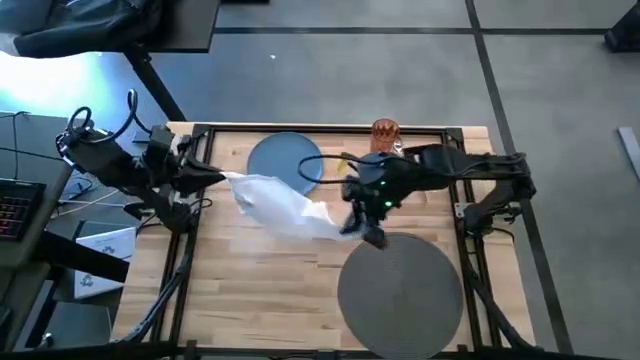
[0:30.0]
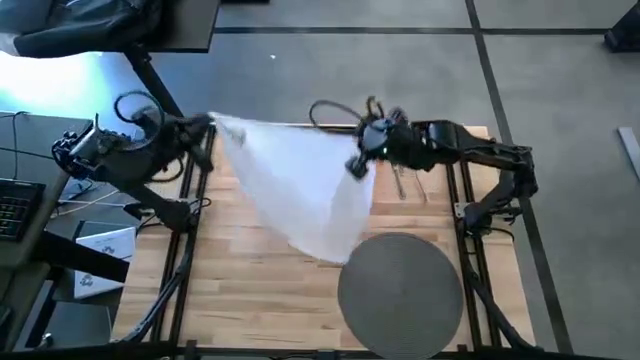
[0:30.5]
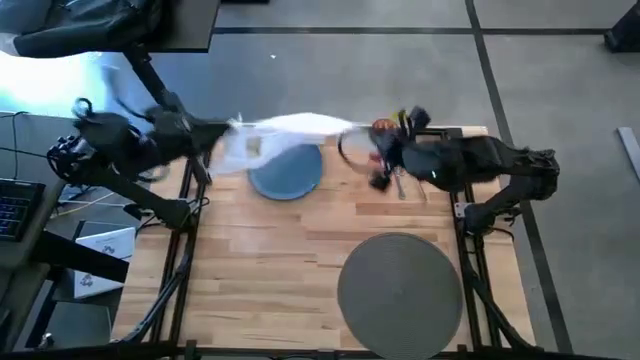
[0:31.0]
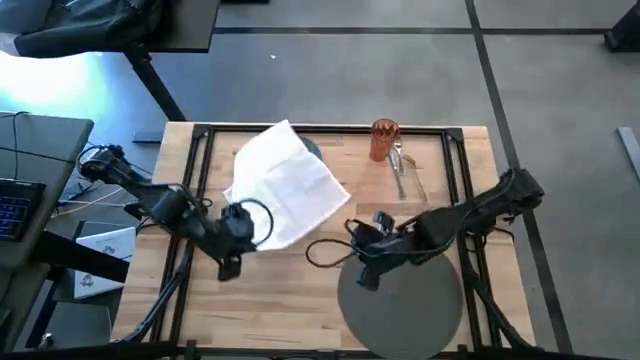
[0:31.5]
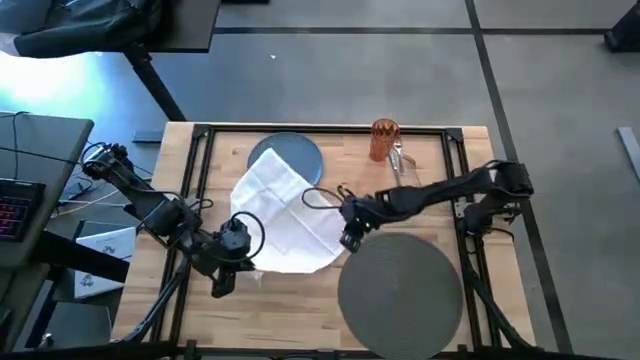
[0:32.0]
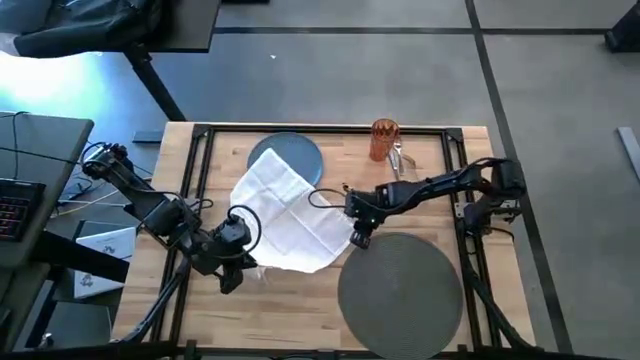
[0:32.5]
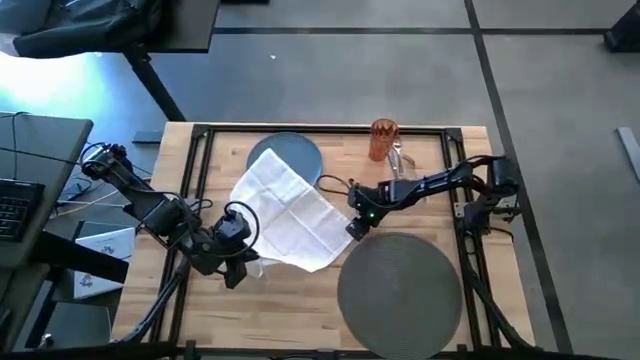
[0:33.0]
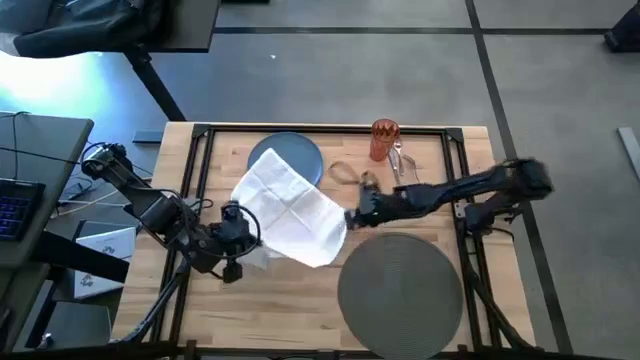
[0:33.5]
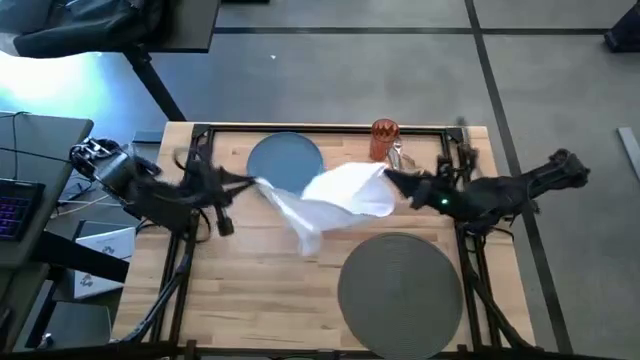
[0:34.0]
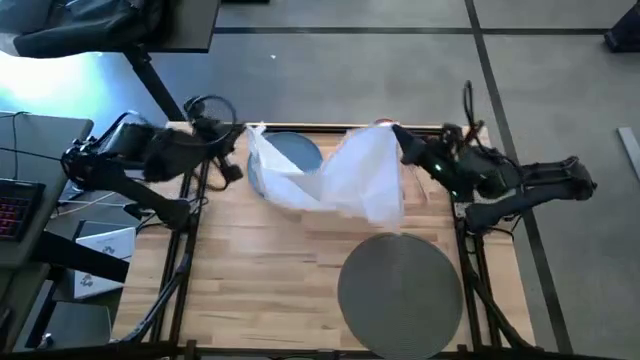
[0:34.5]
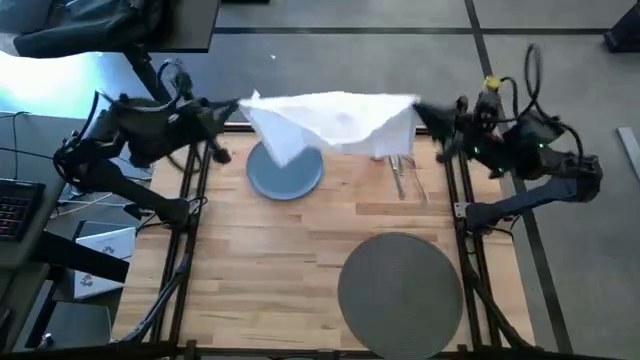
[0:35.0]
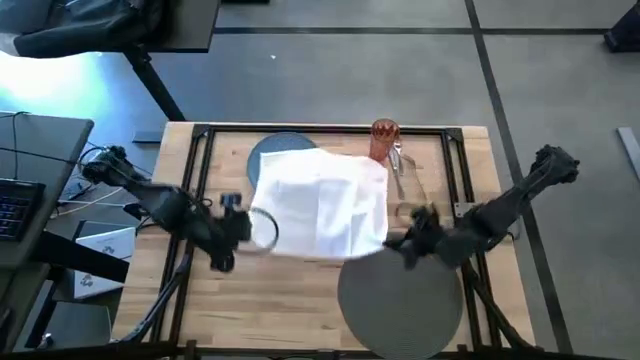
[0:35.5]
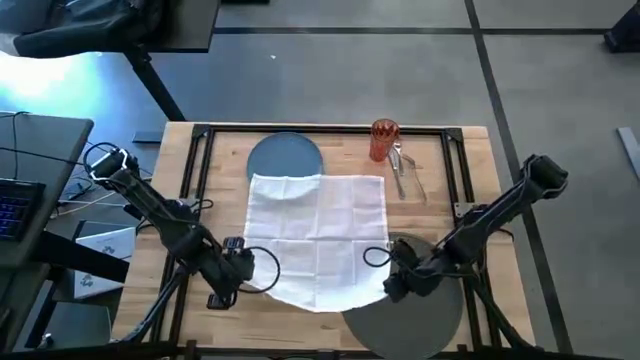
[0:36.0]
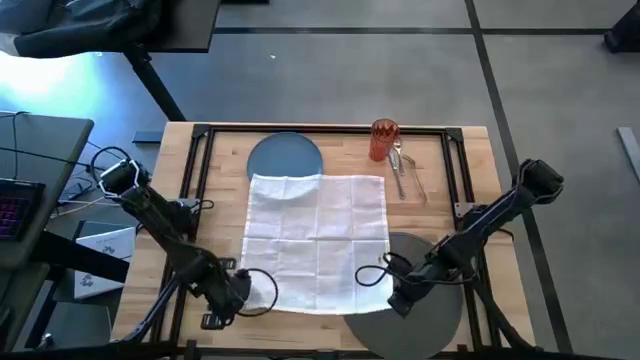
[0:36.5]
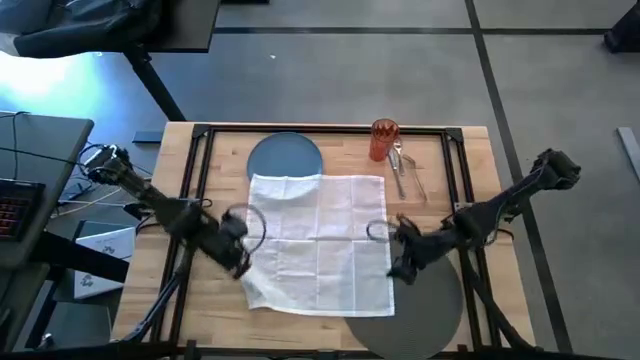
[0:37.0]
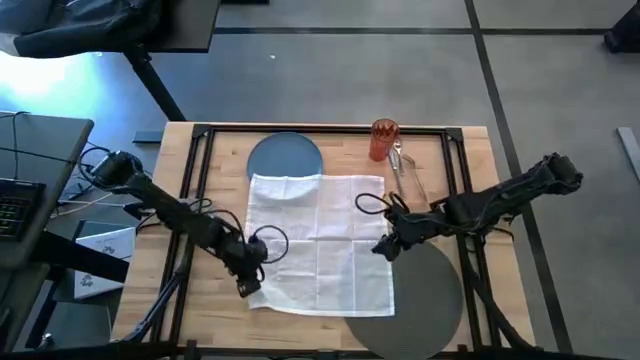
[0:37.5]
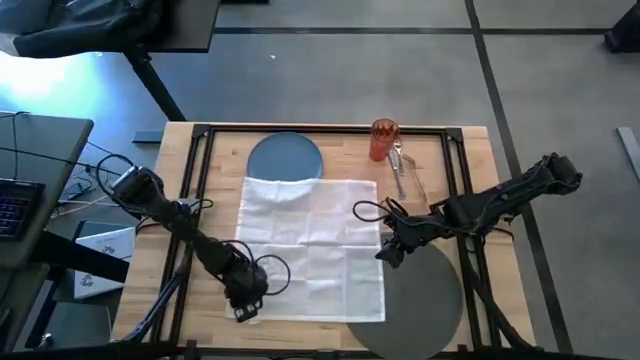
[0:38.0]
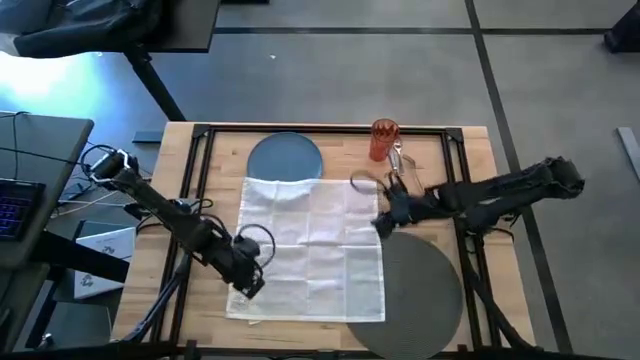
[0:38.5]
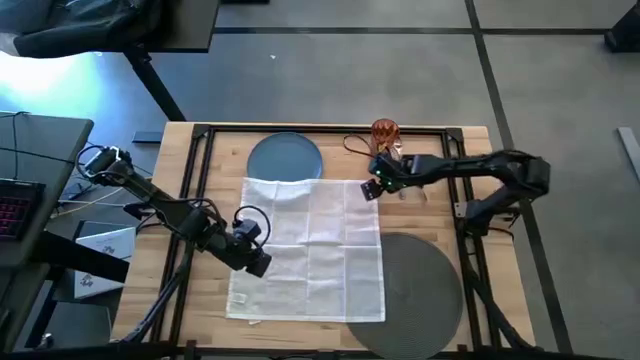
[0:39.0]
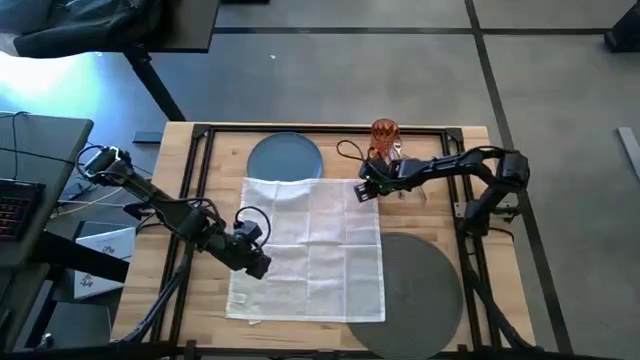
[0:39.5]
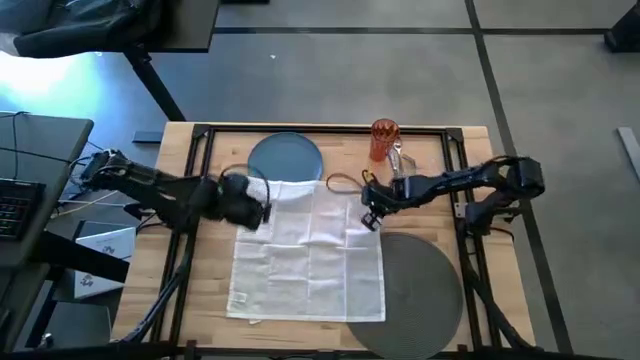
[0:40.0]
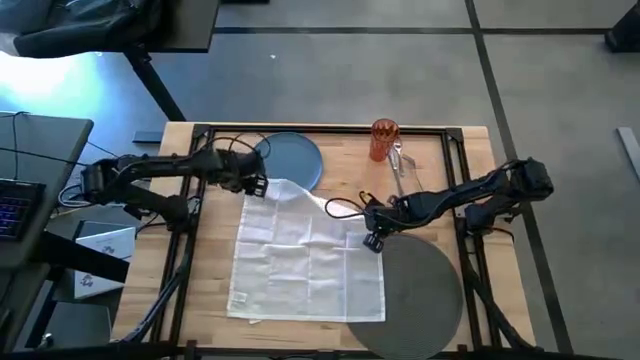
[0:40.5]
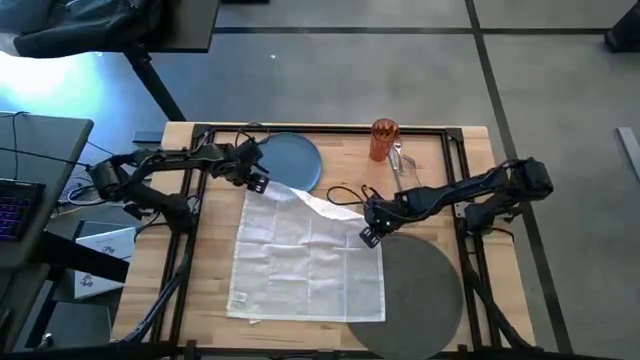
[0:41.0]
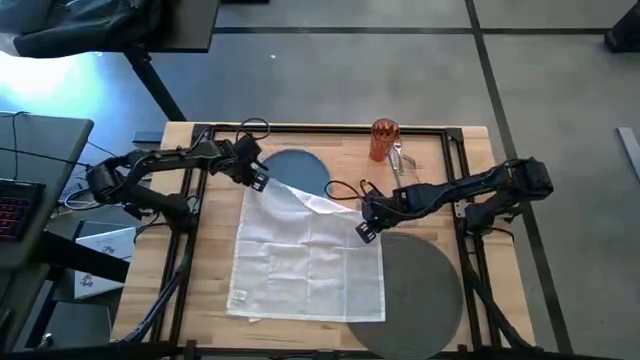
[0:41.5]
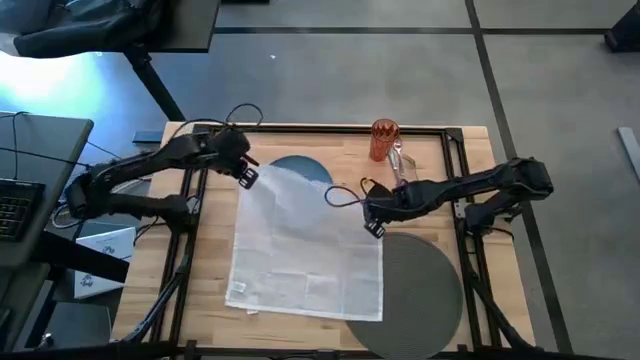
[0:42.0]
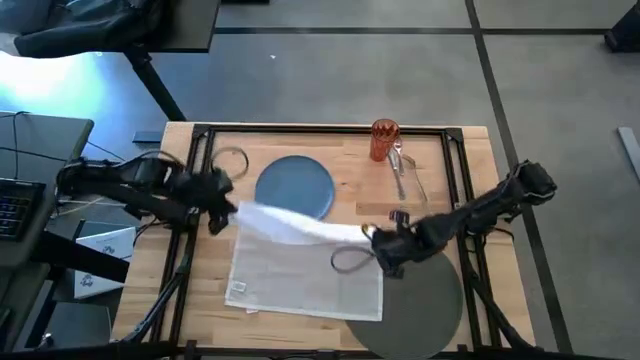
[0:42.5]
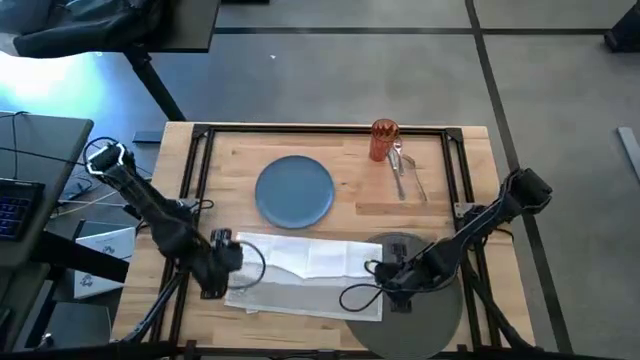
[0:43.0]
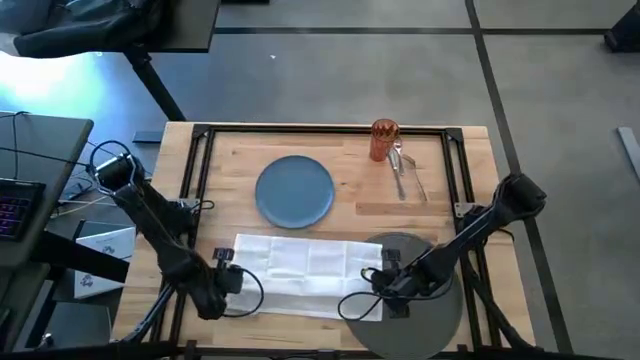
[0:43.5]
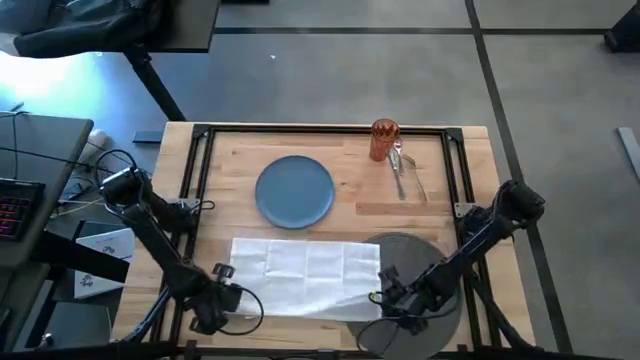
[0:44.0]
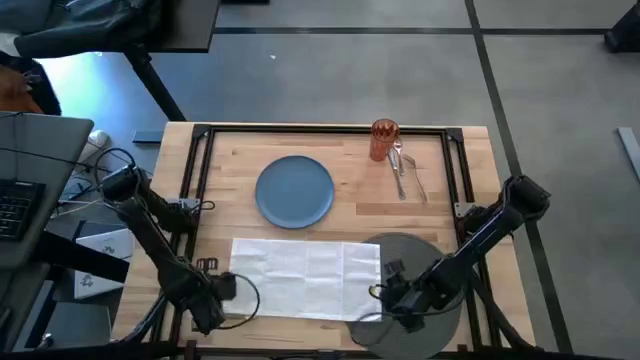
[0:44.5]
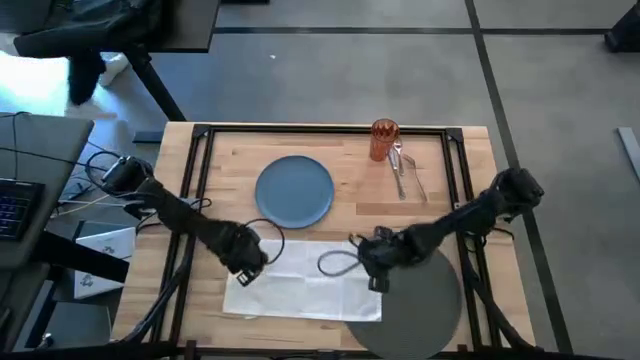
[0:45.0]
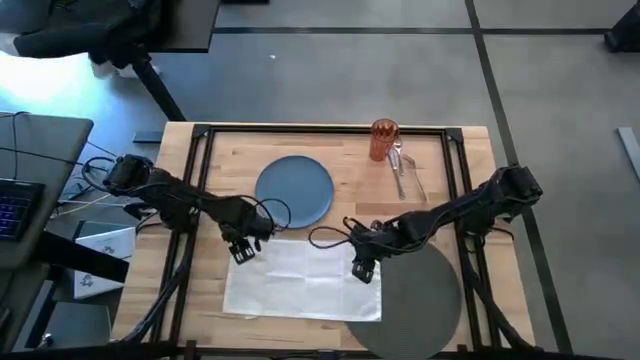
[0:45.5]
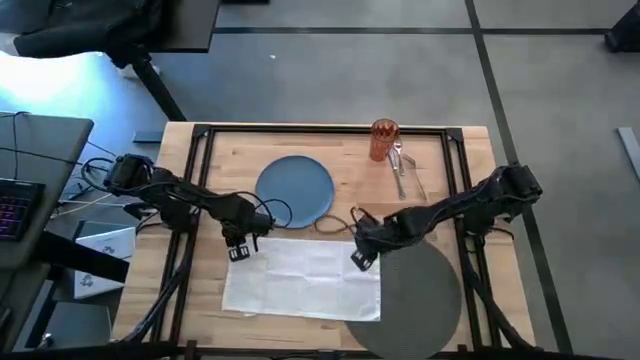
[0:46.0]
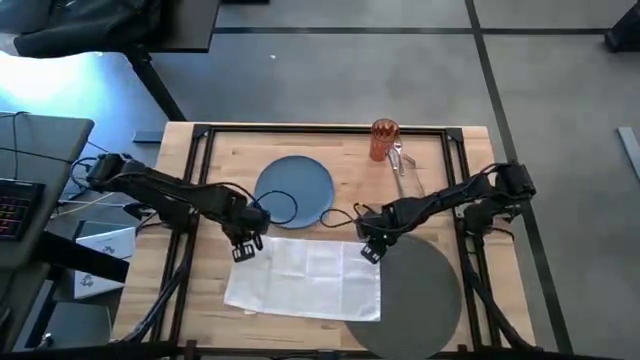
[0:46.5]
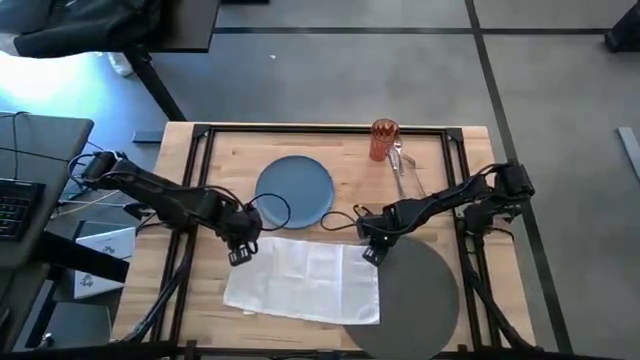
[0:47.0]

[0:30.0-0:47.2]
Task: Set table place
Fold the white table napkin
